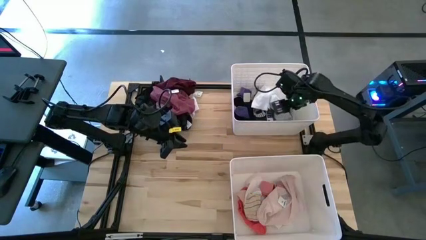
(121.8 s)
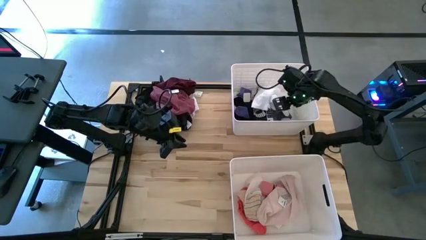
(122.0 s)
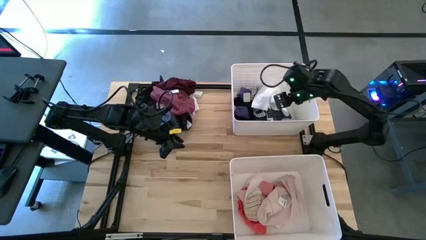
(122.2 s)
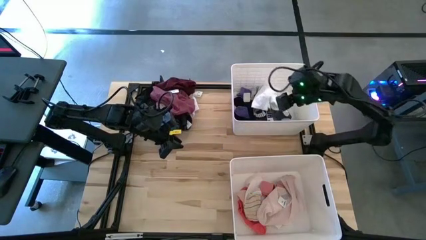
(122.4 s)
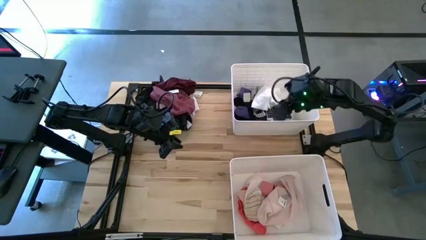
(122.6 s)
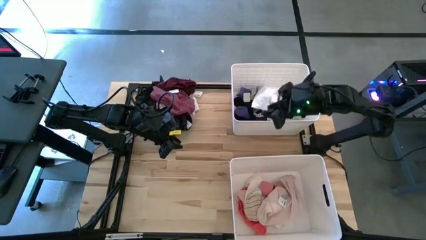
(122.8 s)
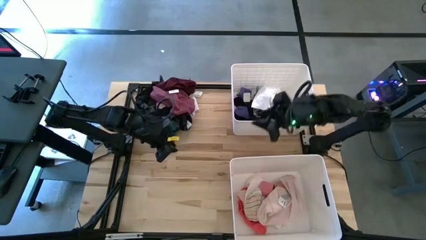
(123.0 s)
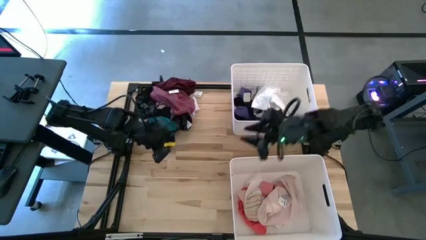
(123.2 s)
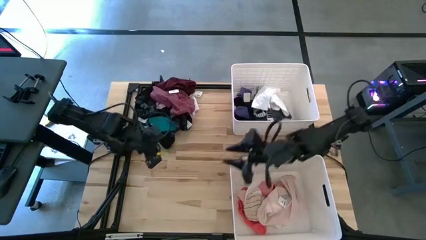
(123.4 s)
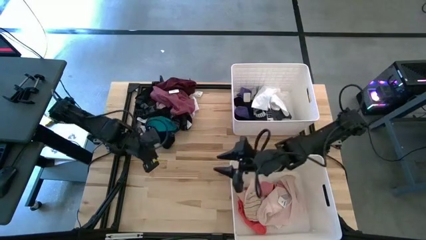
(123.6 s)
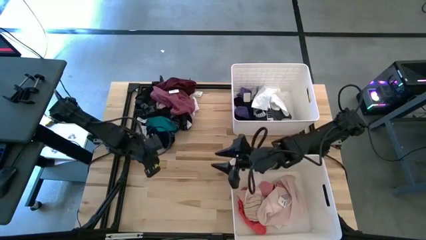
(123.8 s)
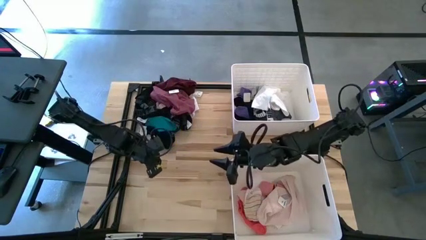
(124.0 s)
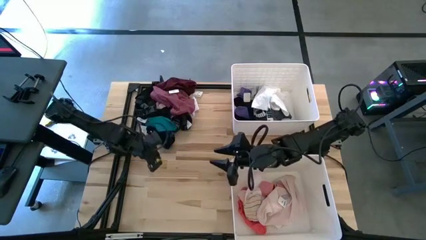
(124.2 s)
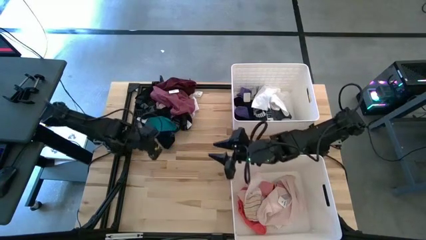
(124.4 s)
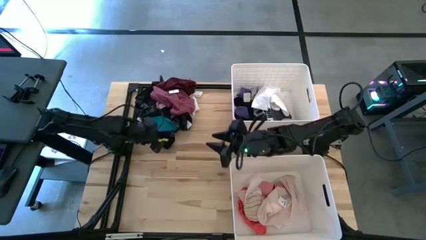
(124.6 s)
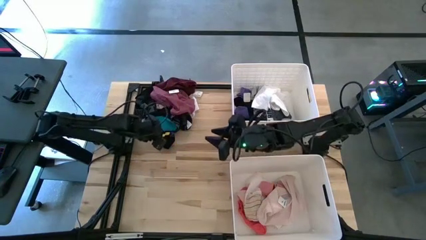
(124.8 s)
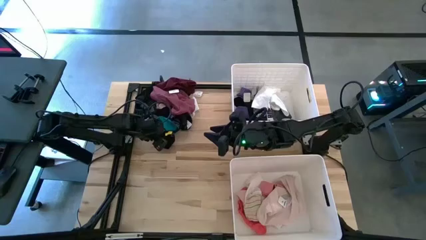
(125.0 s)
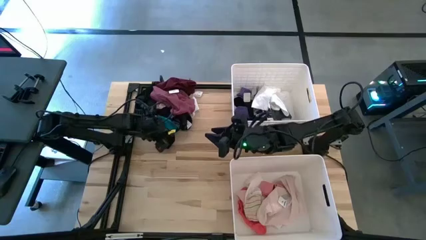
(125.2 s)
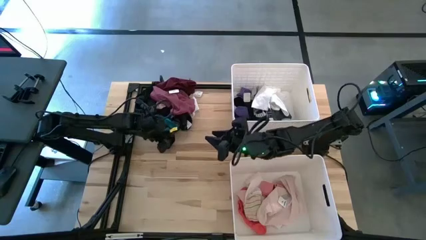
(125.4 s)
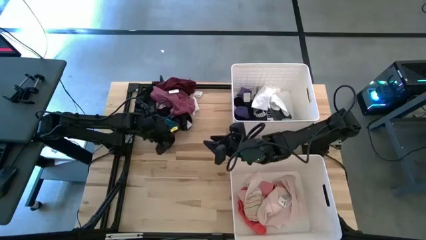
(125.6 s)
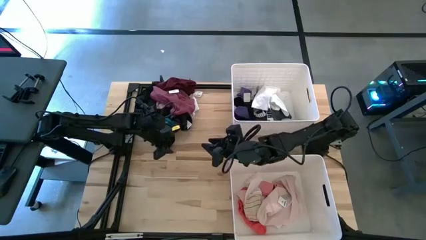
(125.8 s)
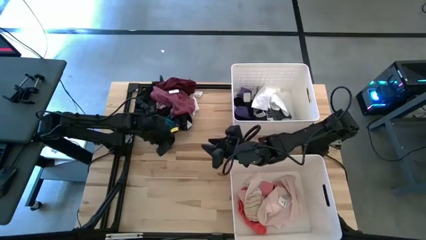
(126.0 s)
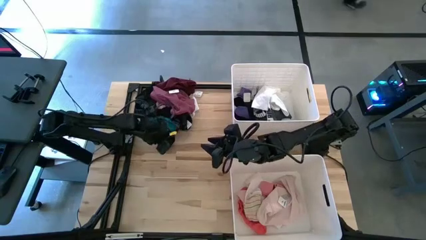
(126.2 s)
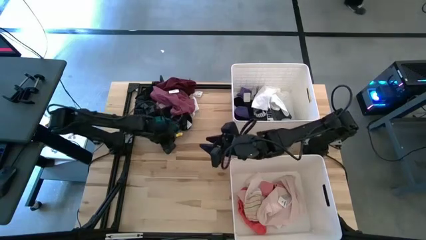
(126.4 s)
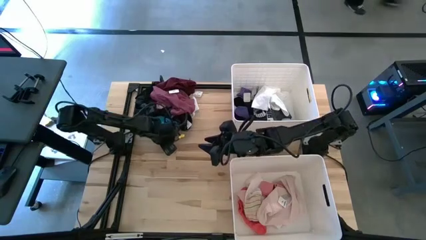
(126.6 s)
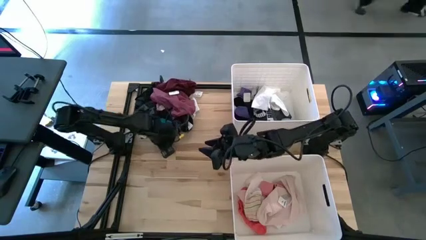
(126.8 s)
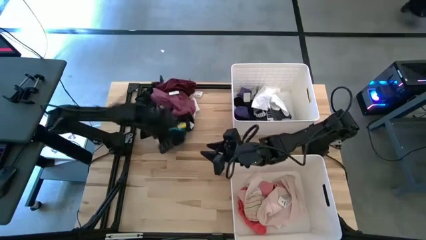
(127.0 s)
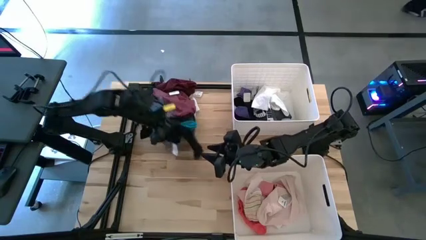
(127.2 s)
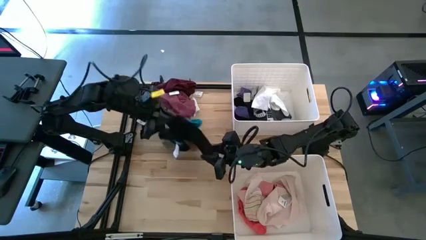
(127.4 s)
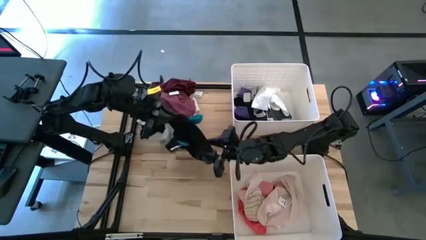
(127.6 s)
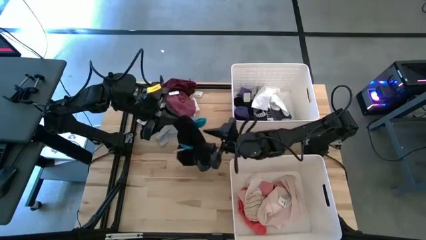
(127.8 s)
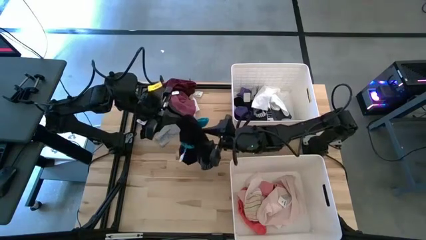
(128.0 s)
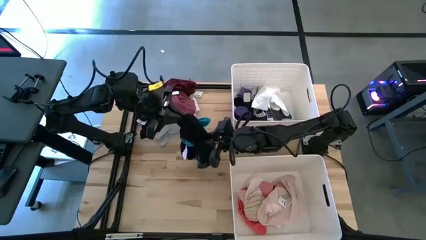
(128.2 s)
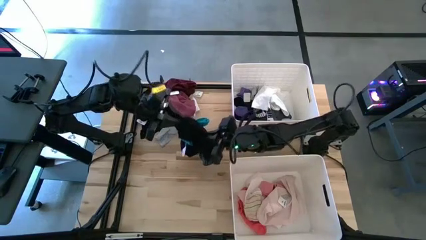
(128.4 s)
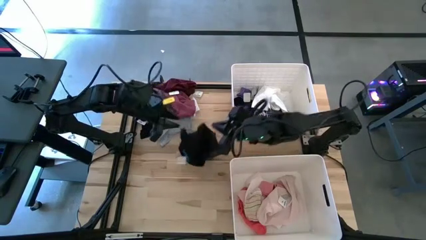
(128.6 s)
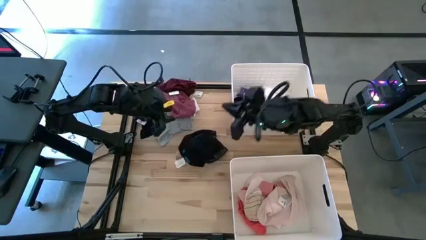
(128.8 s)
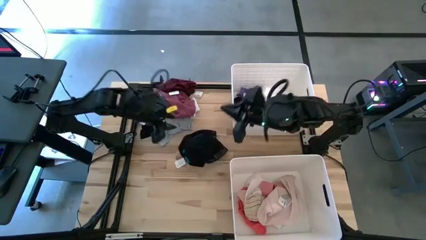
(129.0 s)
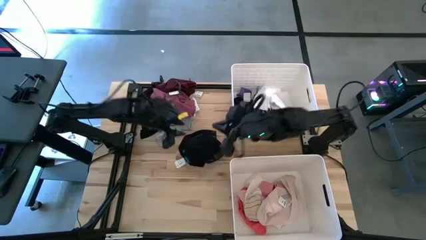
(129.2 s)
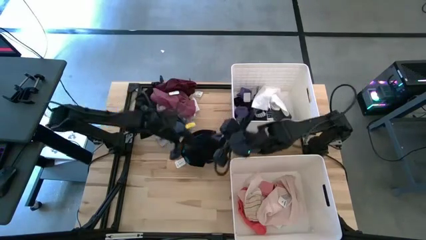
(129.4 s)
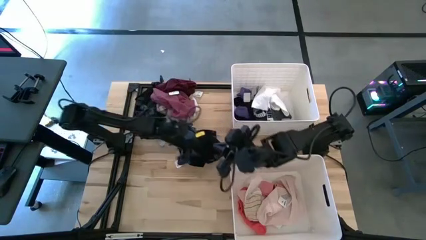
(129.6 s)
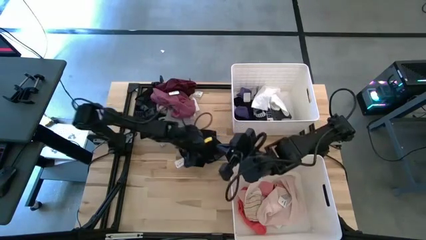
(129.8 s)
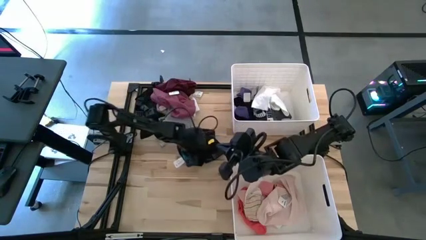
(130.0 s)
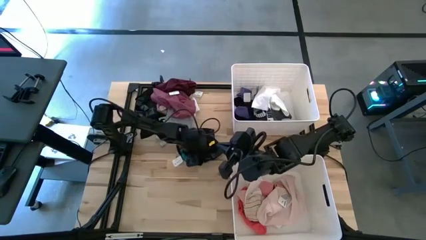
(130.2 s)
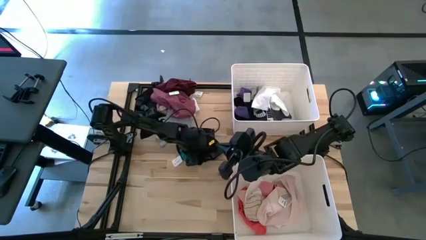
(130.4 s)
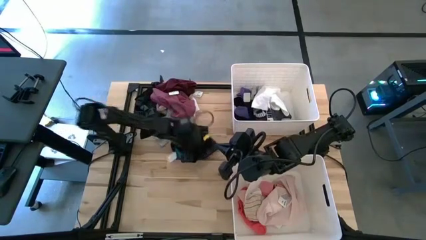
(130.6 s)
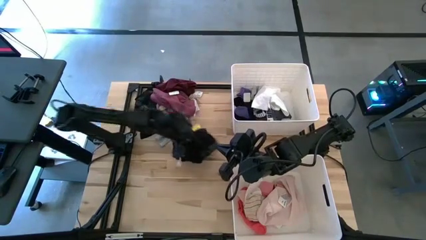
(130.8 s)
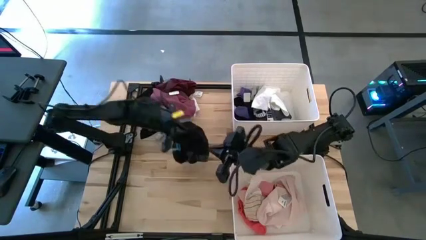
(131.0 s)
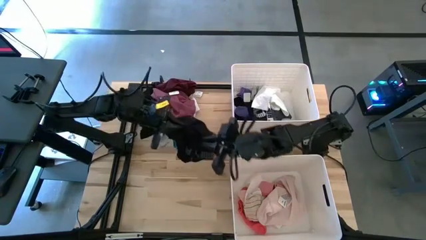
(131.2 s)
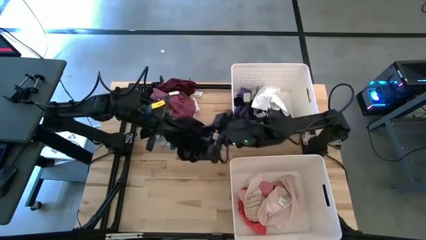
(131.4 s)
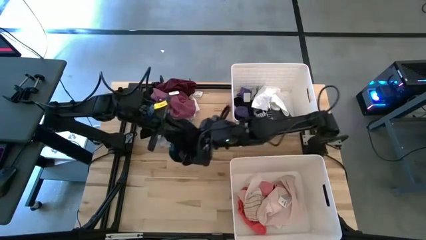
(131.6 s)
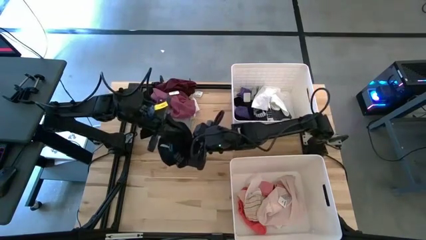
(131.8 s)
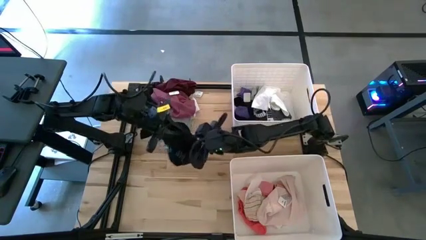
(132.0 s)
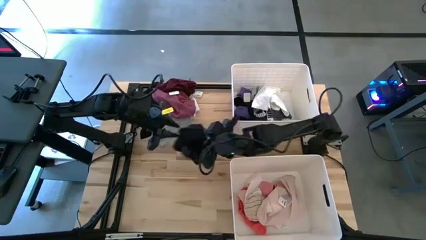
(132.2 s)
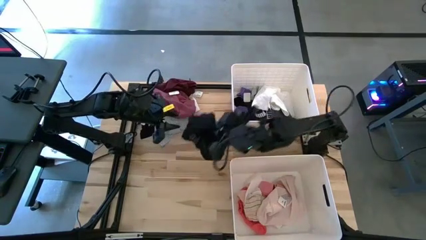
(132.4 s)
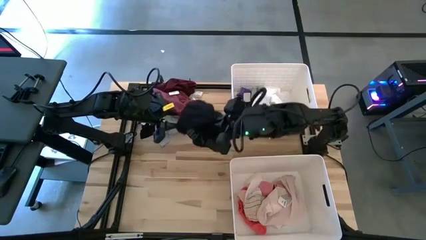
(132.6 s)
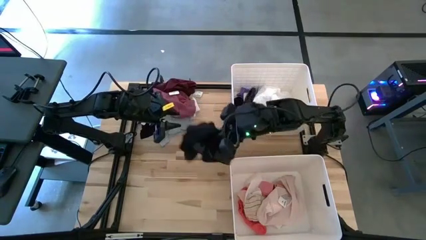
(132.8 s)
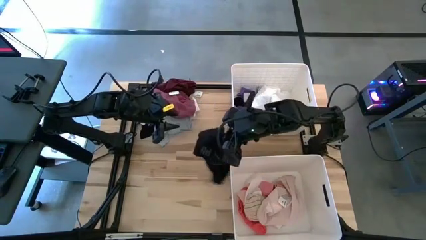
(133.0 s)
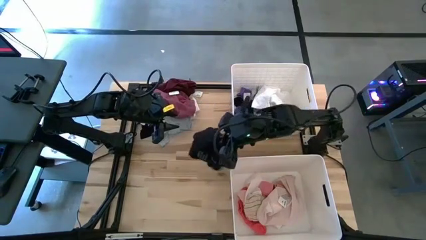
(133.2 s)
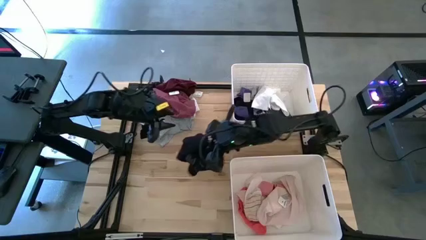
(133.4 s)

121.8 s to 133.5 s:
Task: Sort clothes
Put the black shorts into the top bin

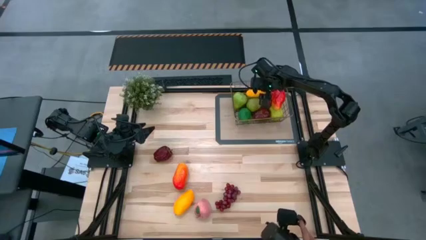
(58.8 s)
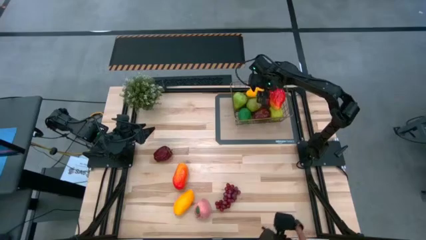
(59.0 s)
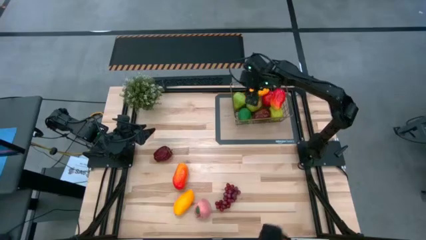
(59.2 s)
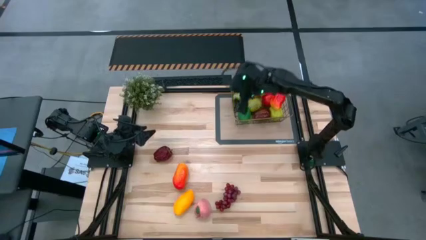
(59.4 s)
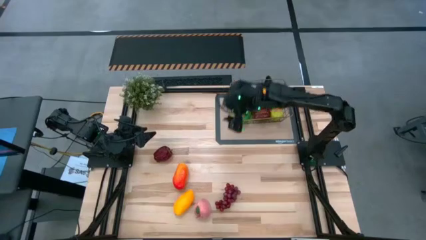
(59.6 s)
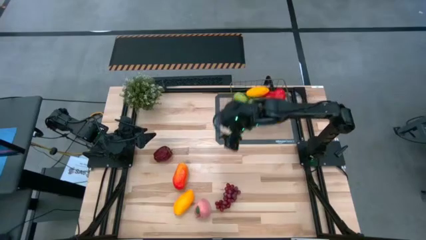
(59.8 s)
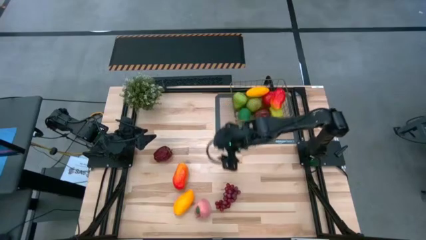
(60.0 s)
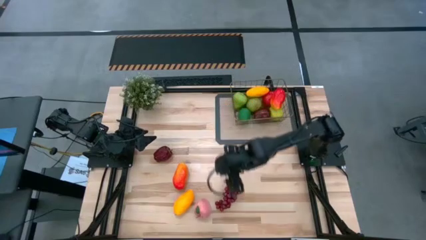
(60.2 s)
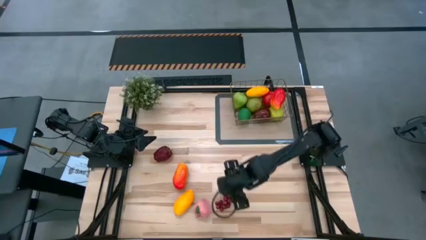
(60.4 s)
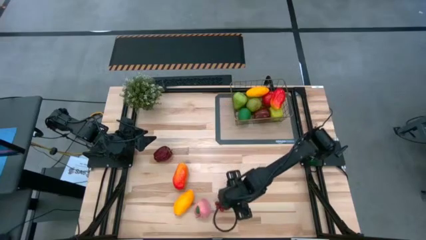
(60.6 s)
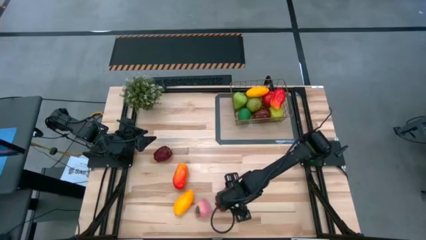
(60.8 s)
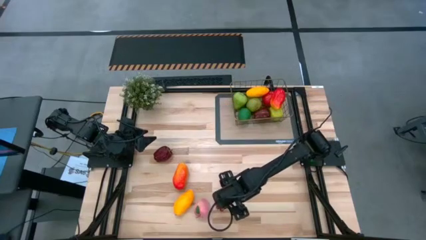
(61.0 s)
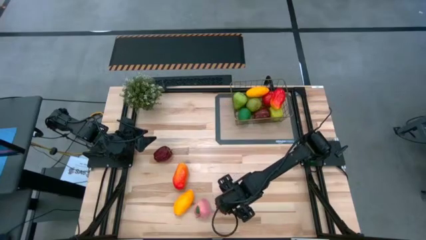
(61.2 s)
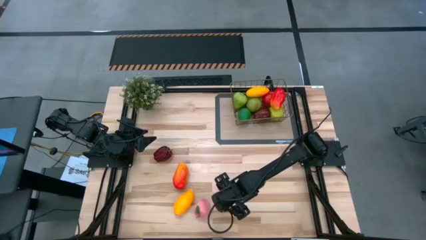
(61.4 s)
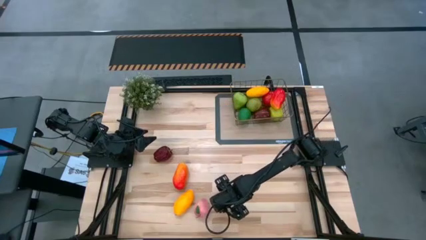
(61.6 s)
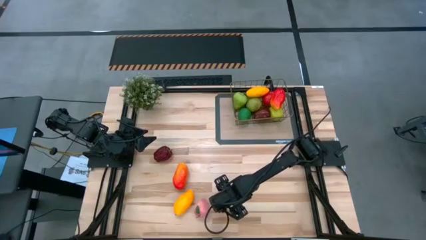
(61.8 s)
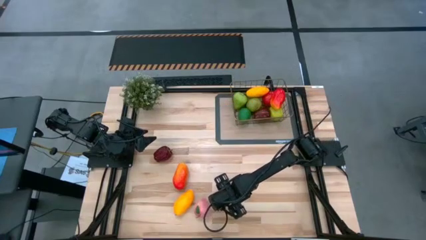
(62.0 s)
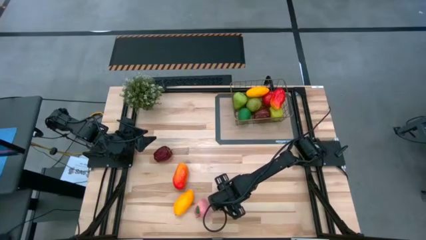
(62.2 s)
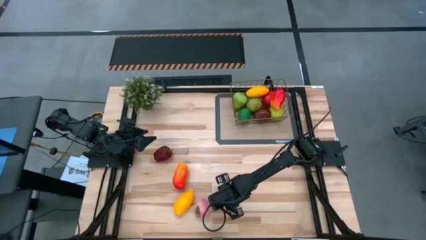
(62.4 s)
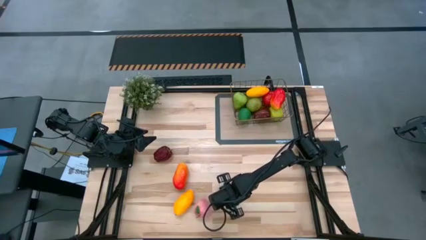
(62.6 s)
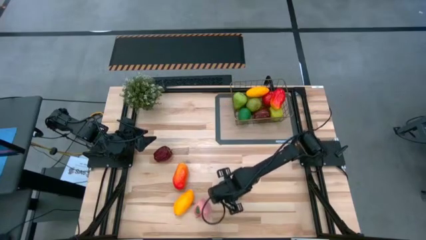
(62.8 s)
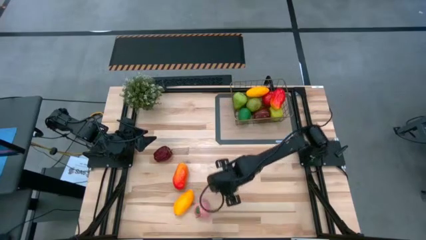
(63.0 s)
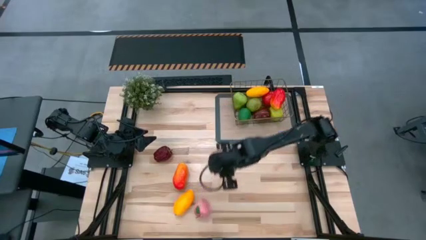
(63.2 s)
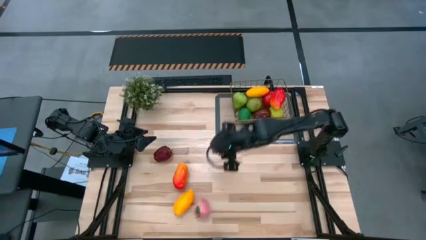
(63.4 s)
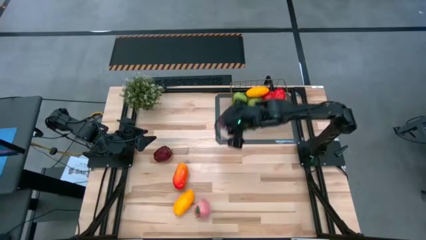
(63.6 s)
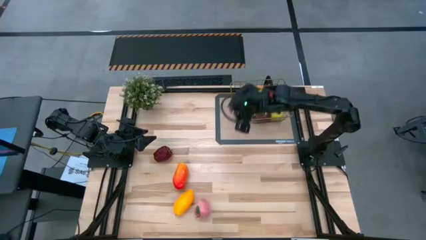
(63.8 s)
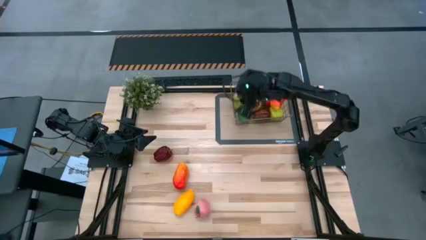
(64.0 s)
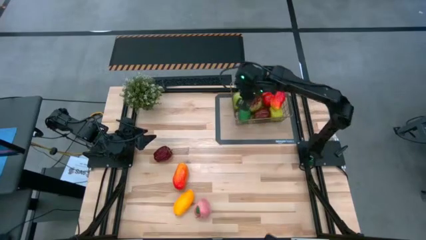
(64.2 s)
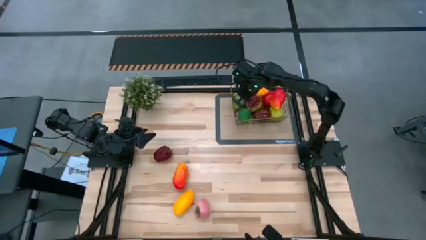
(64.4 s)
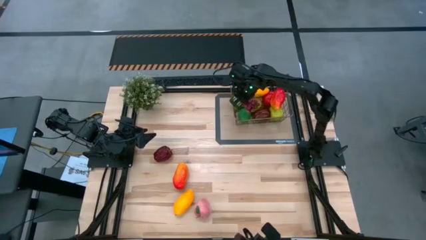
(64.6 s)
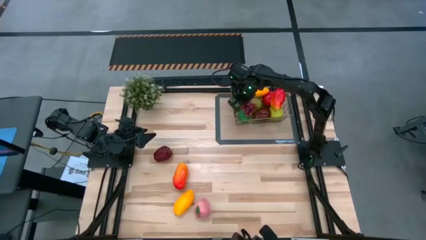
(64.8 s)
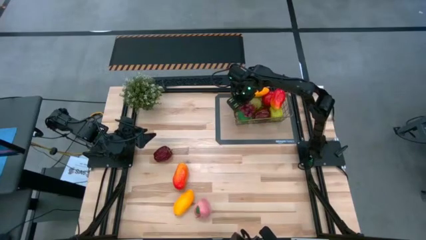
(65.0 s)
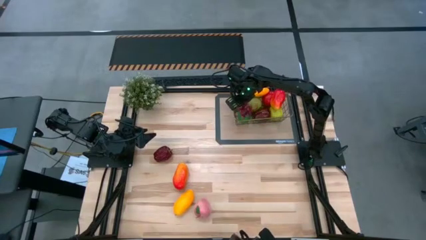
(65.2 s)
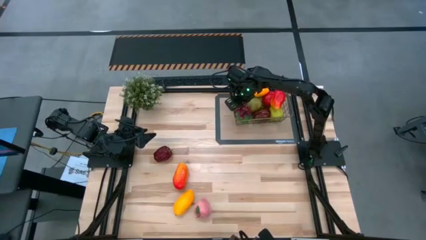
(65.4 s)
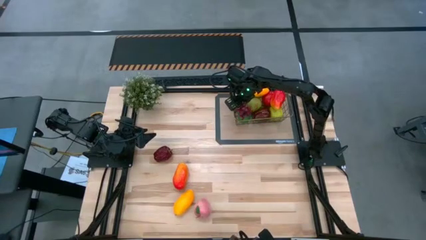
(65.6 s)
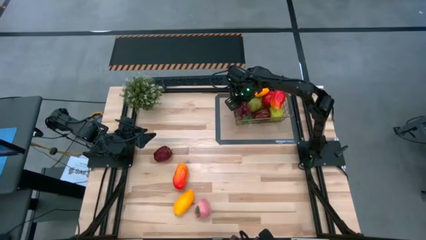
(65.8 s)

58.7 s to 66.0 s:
Task: Build produce basket
Put the grapes into the gold wire basket
